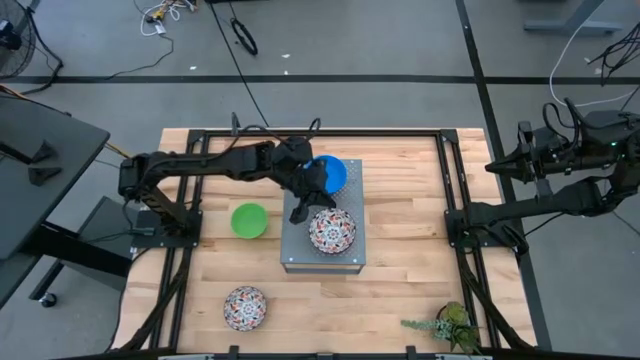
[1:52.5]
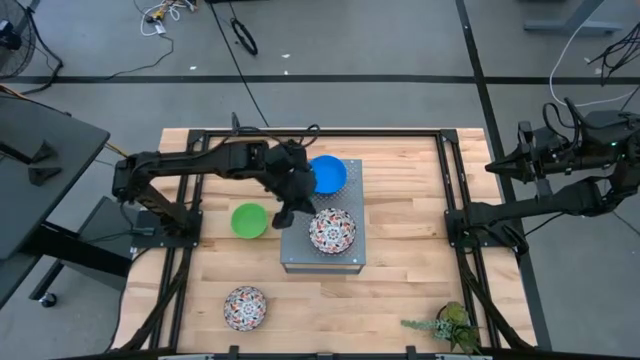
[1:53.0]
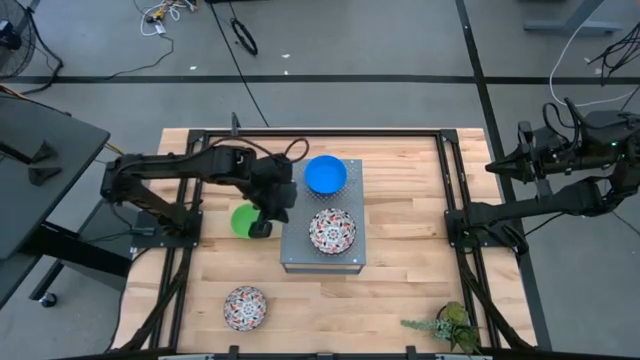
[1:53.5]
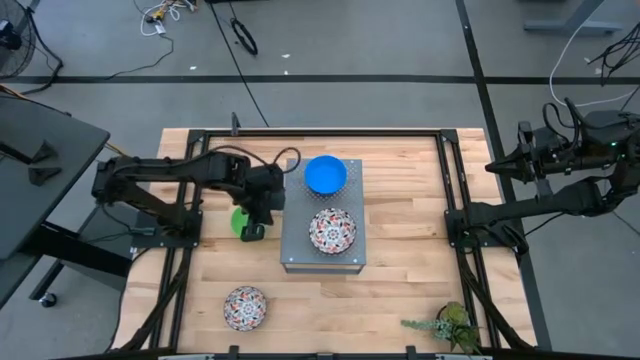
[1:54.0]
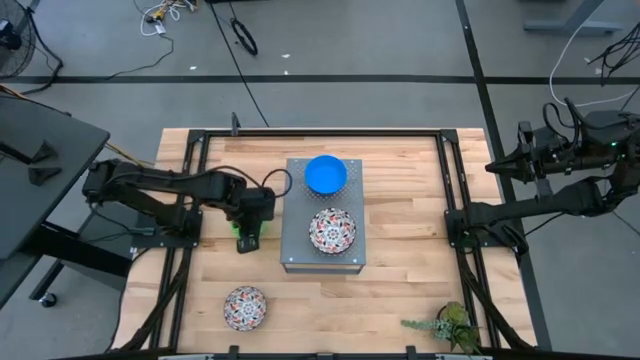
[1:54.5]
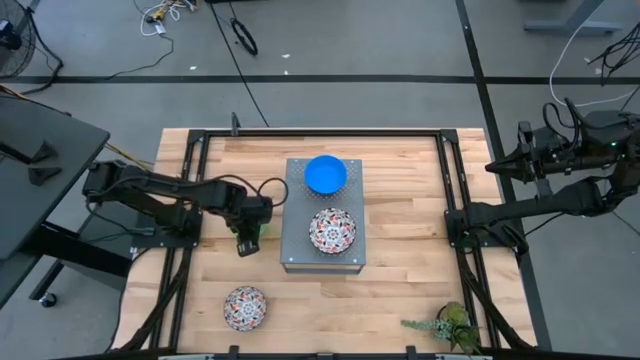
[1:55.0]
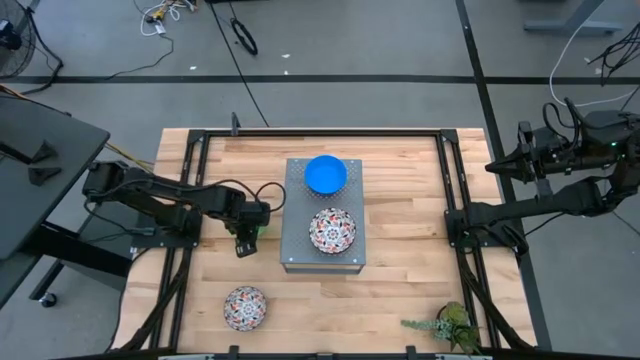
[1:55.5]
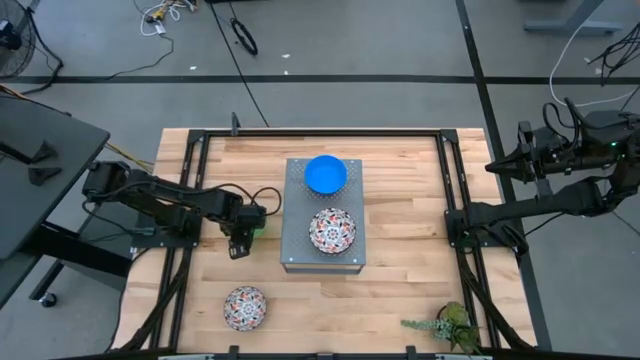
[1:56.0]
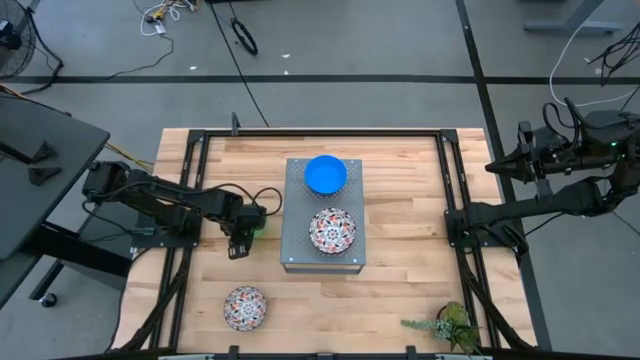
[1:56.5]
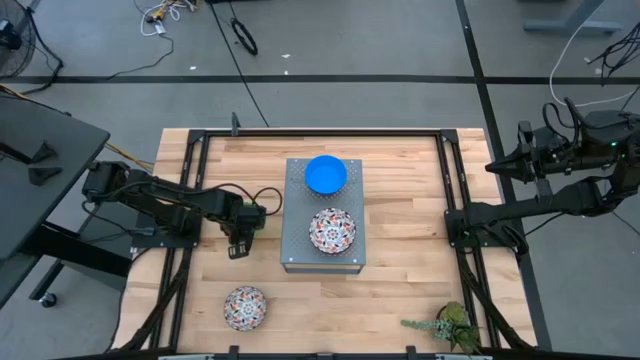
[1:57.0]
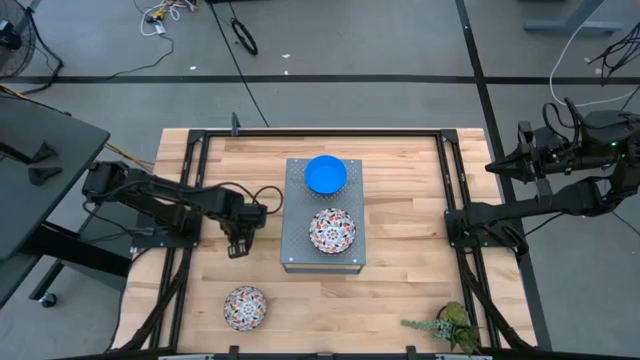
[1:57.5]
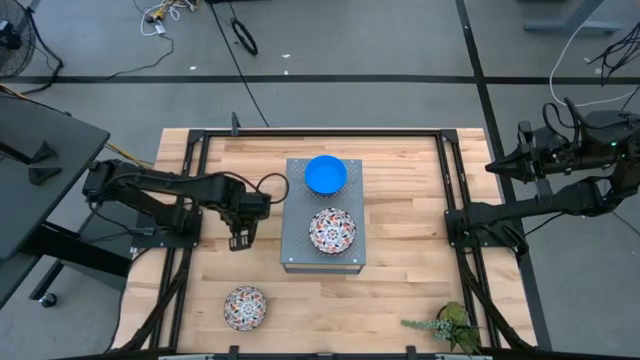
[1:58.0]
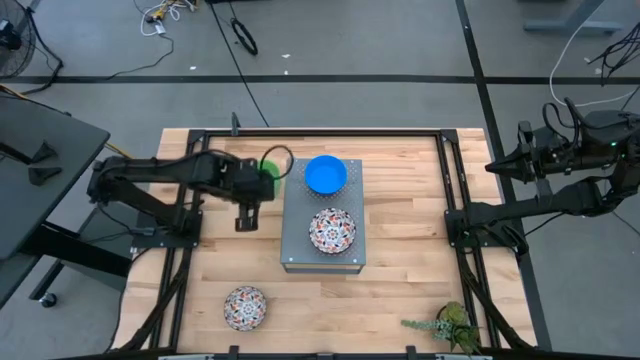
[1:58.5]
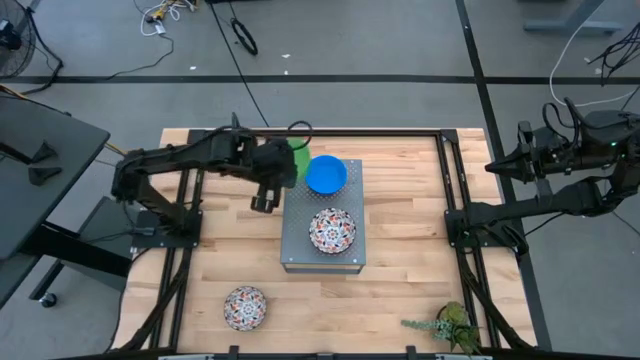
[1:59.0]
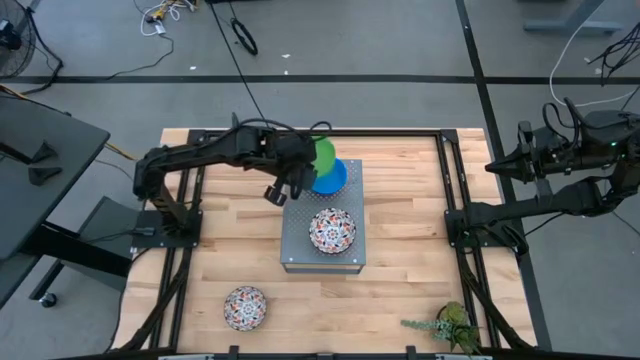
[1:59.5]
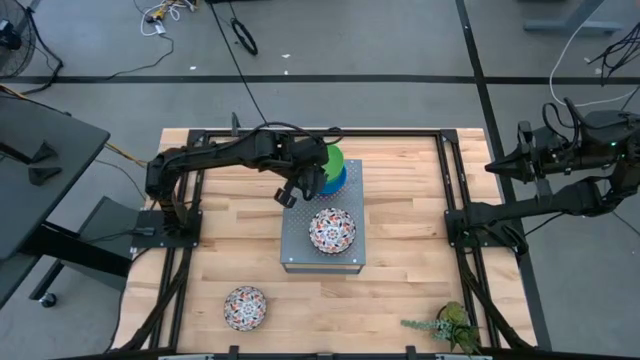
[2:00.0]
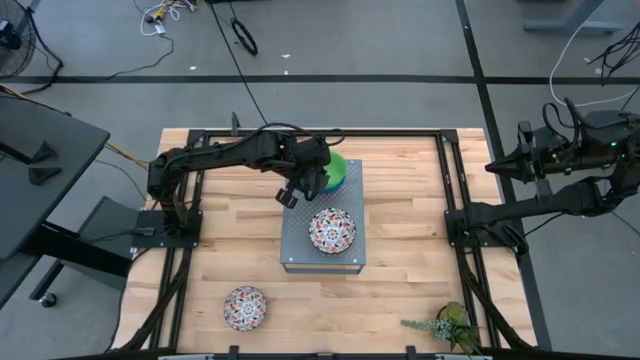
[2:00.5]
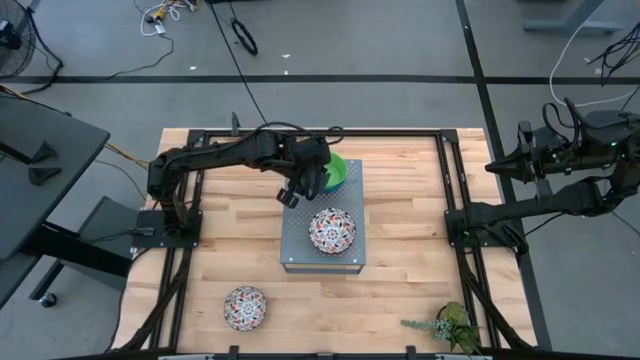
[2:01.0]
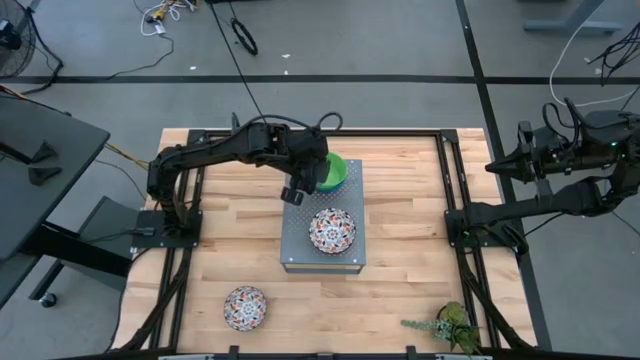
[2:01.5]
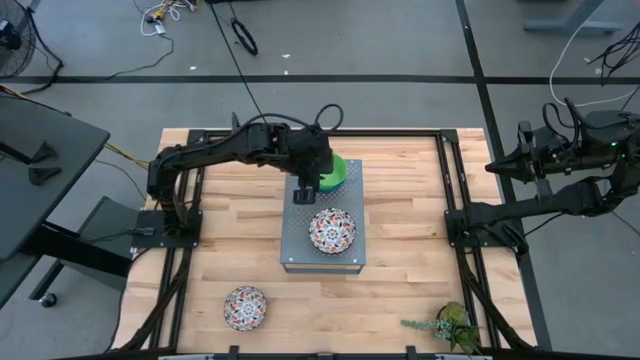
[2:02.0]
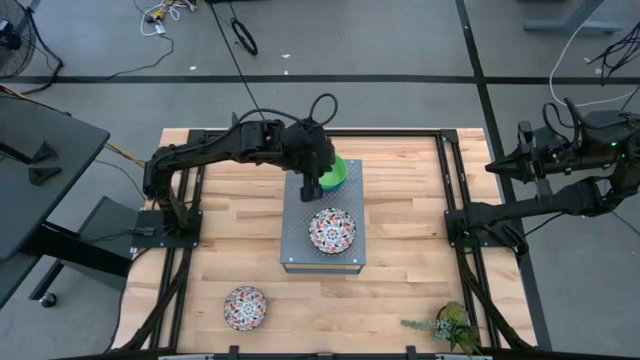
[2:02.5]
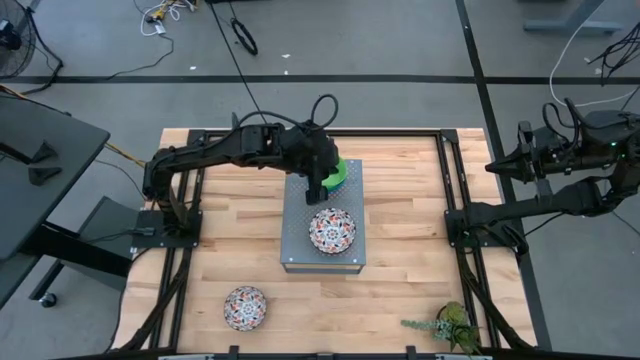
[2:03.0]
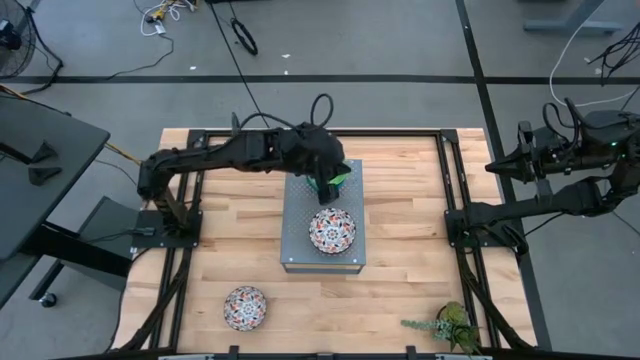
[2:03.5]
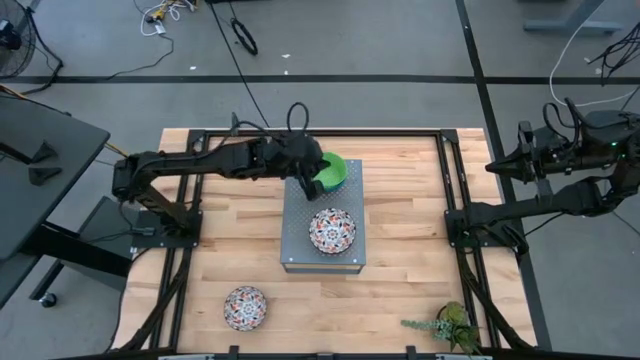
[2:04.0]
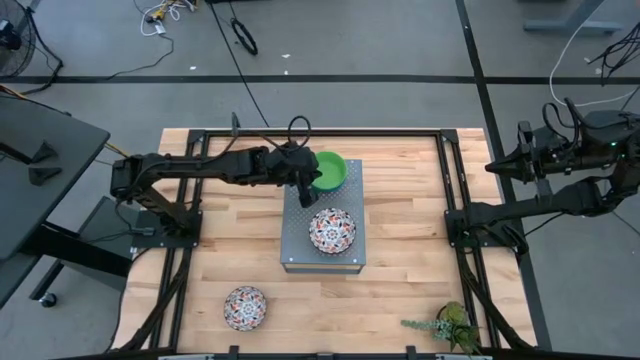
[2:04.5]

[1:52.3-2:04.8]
Task: Pick & Place Mini bowls
Stack the green bowl on top of the light blue bowl on the shelf

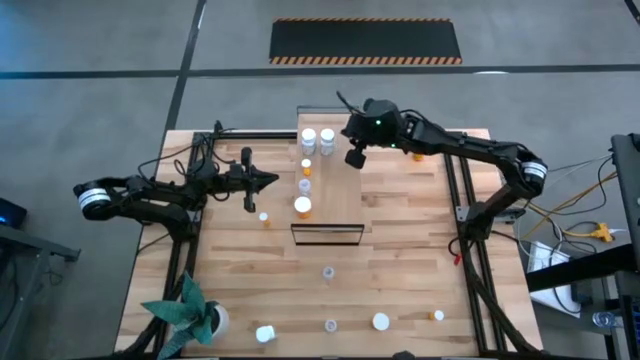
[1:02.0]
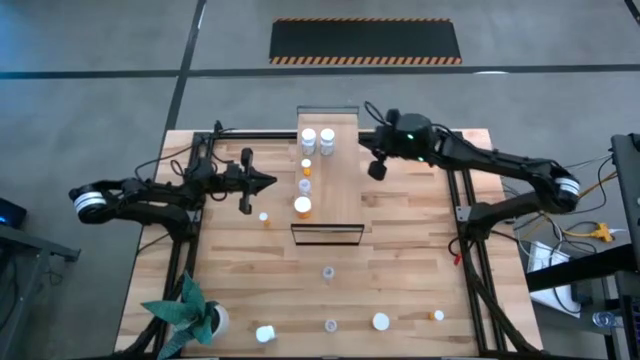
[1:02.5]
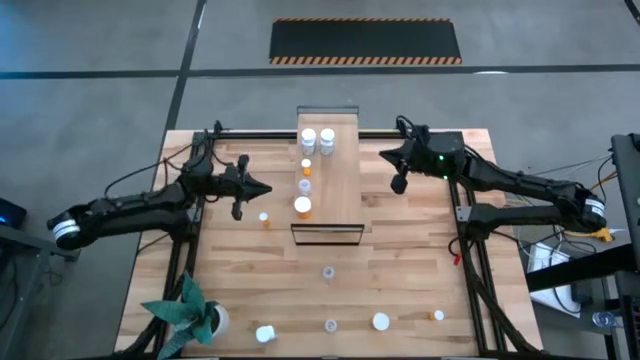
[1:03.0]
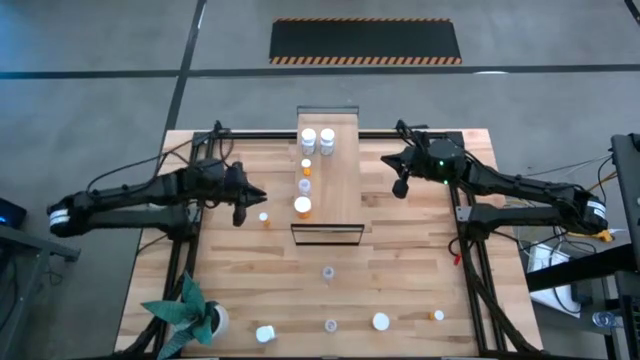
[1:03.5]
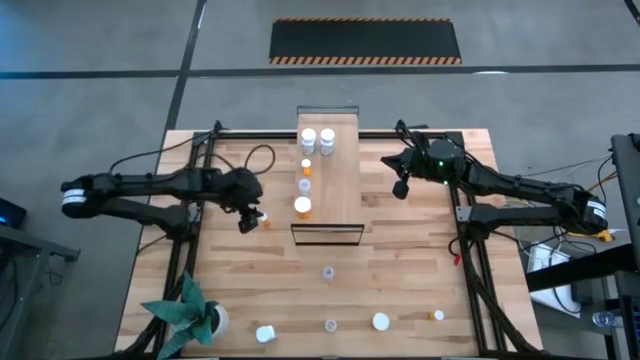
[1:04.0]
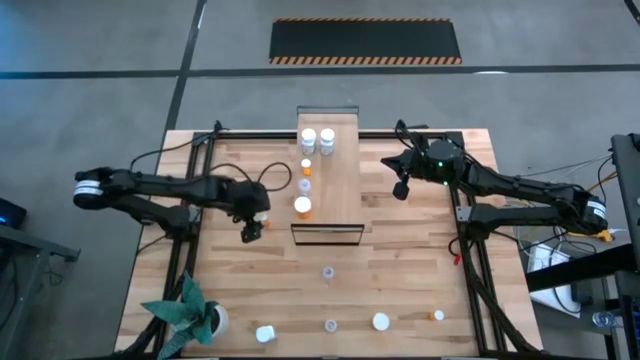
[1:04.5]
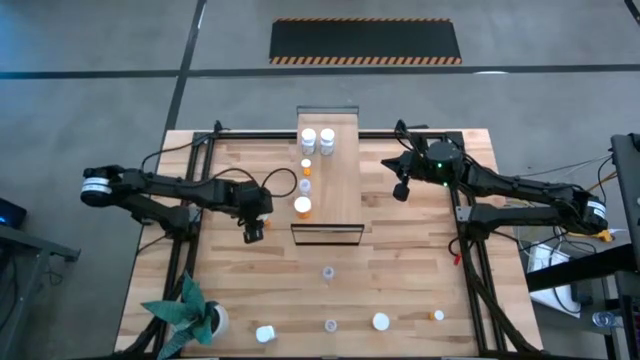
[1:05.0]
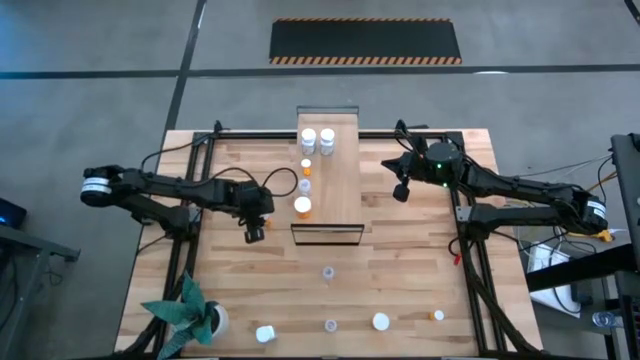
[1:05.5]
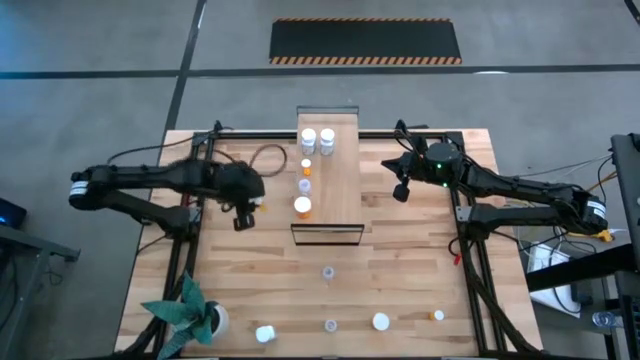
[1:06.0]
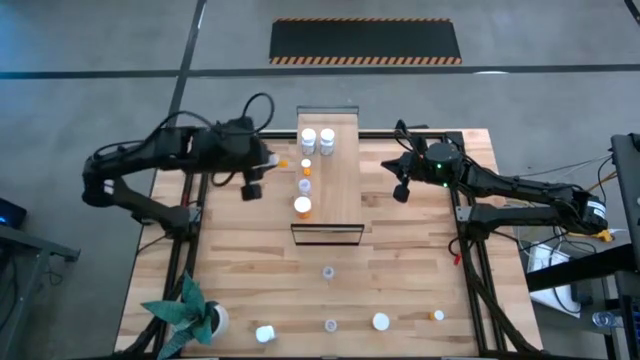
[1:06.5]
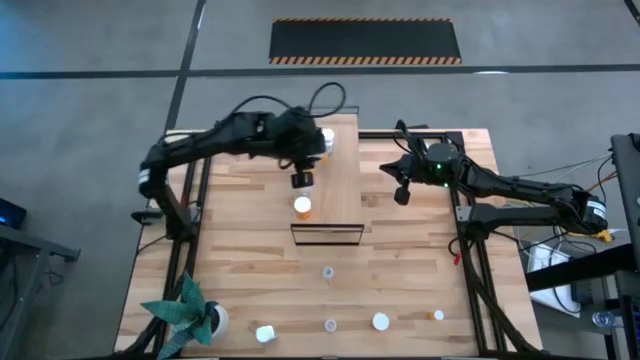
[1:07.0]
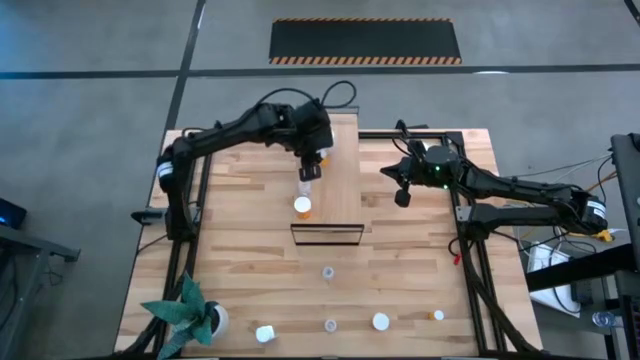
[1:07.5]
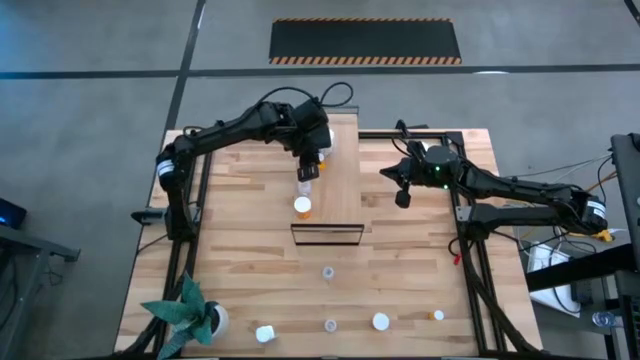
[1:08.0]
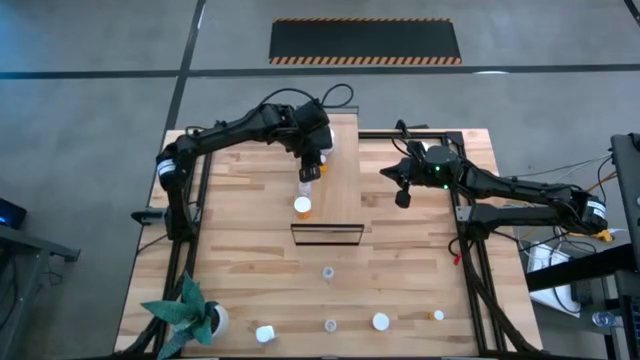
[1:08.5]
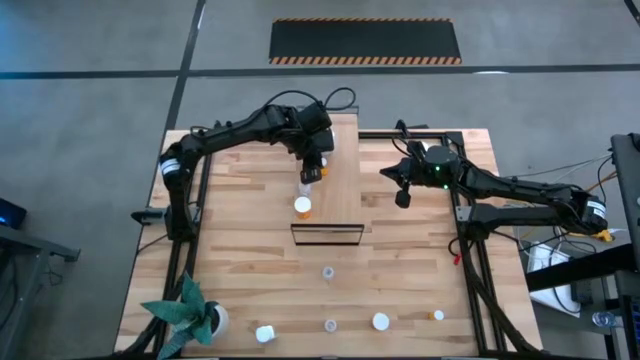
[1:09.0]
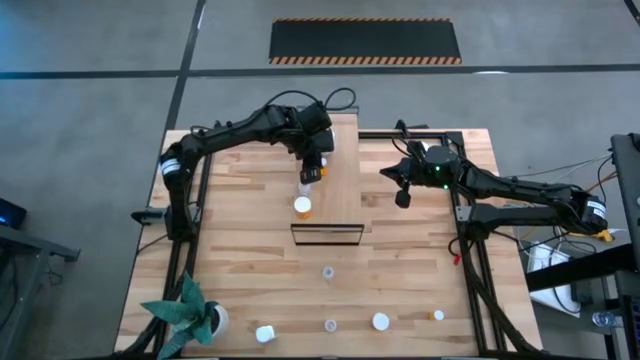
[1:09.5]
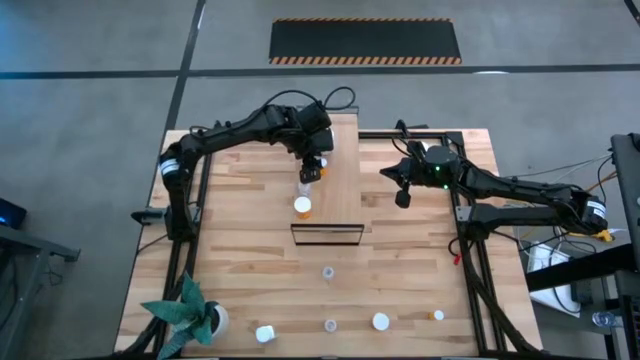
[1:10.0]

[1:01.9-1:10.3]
Task: Pick and place medicine bottles onto shelf by color
Put the top small orange pill bottle aligned with the other small orange pill bottle on the shelf
